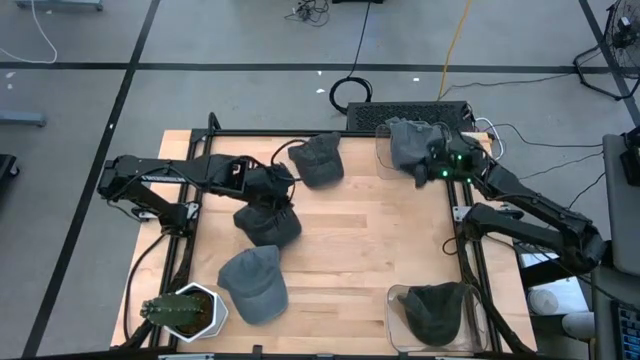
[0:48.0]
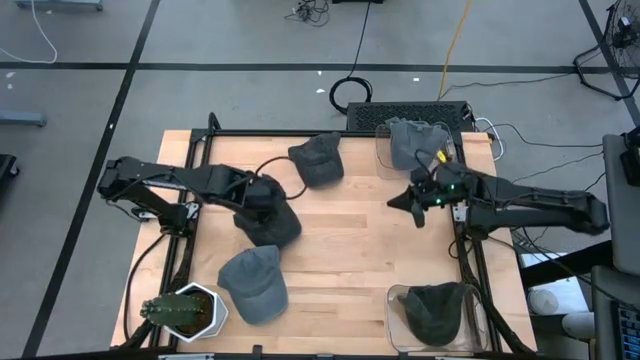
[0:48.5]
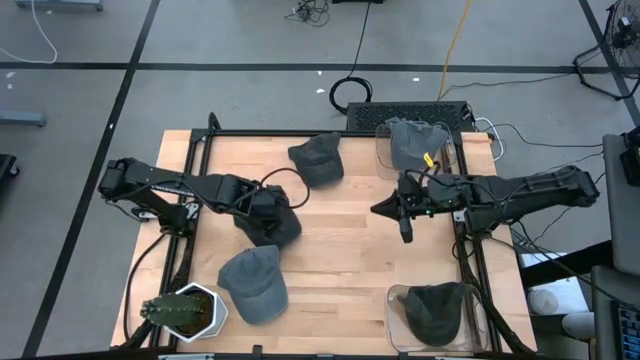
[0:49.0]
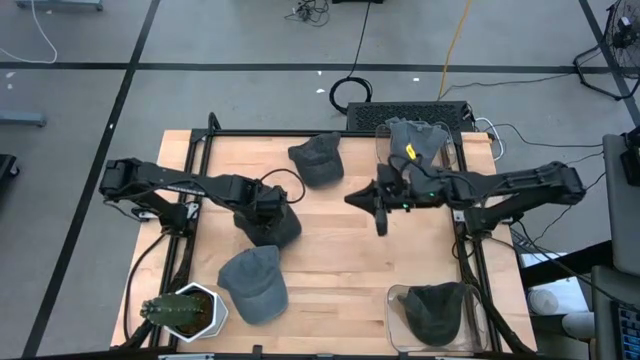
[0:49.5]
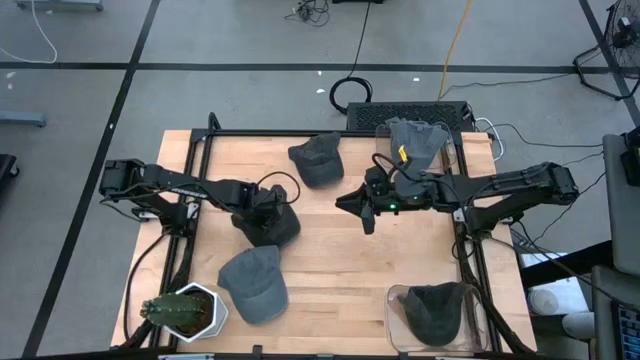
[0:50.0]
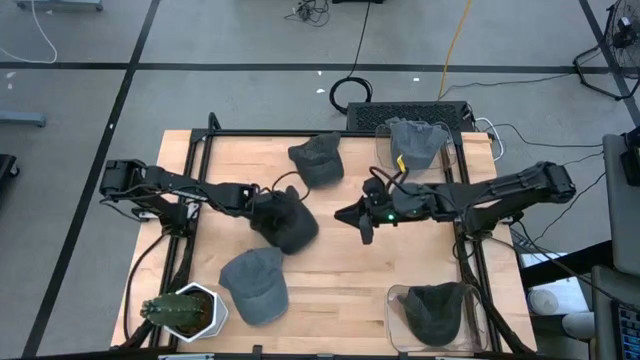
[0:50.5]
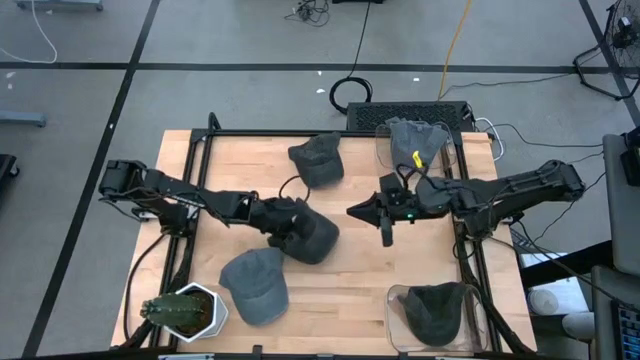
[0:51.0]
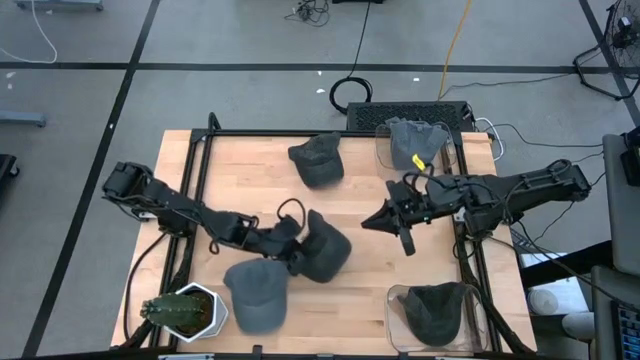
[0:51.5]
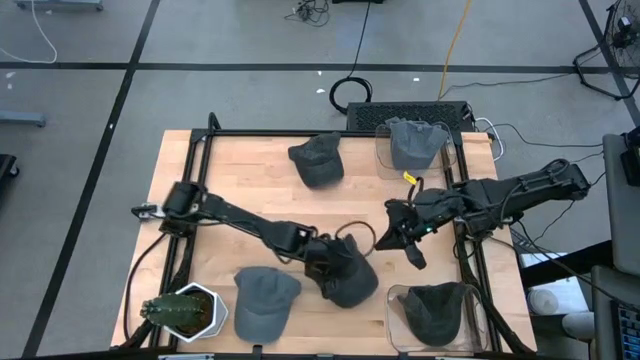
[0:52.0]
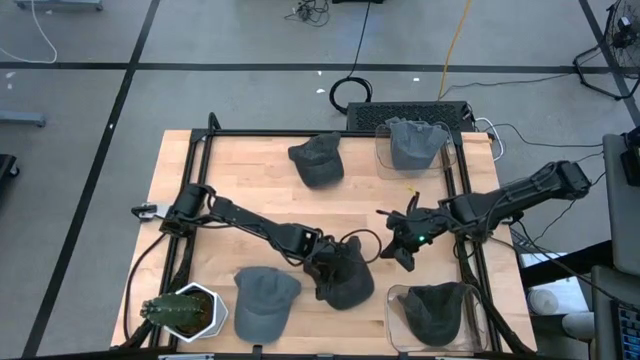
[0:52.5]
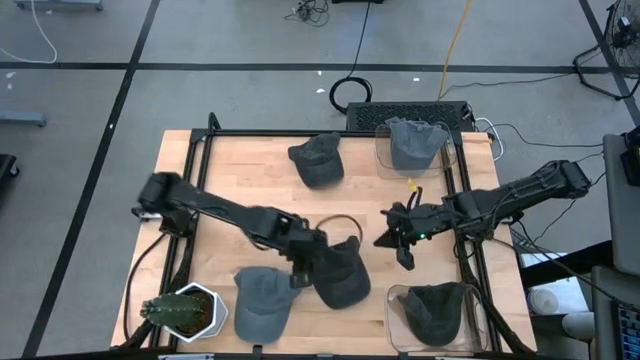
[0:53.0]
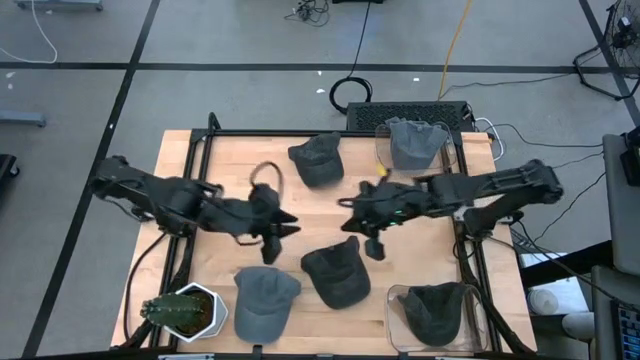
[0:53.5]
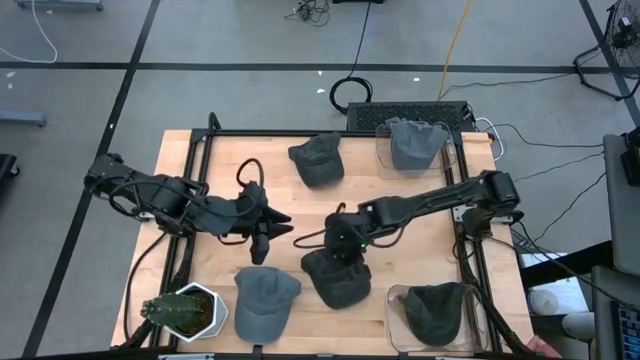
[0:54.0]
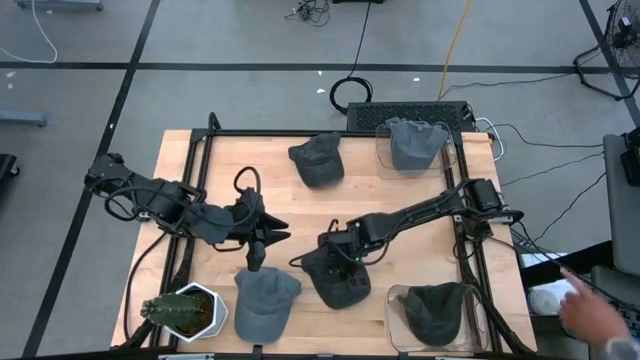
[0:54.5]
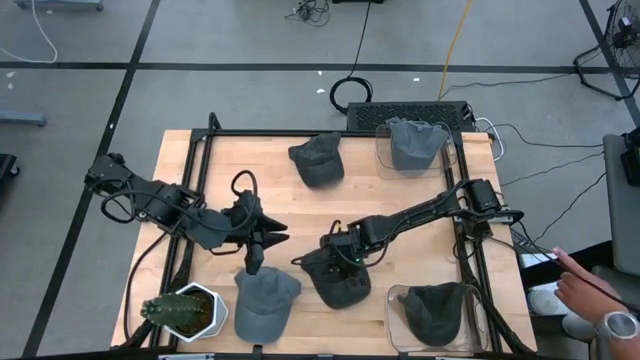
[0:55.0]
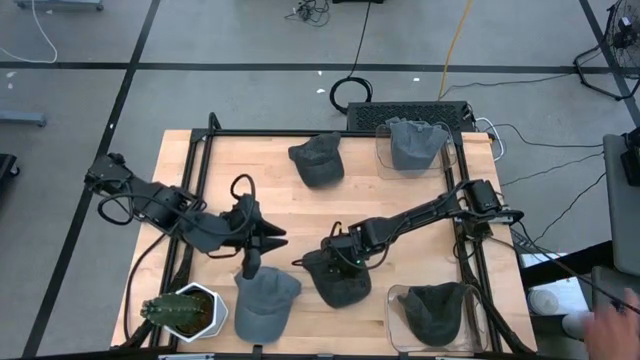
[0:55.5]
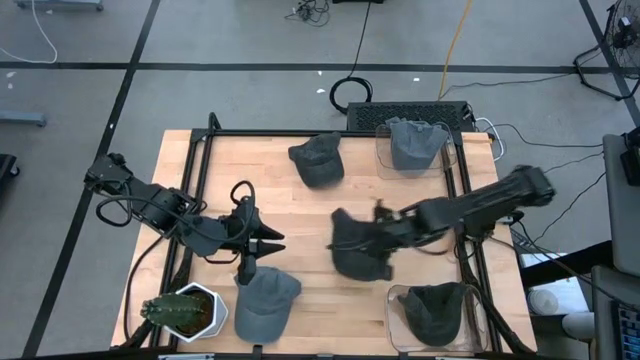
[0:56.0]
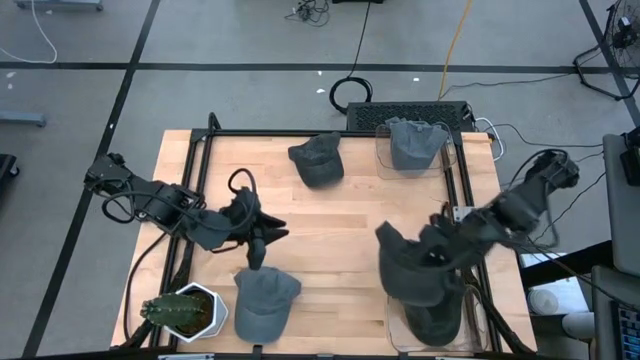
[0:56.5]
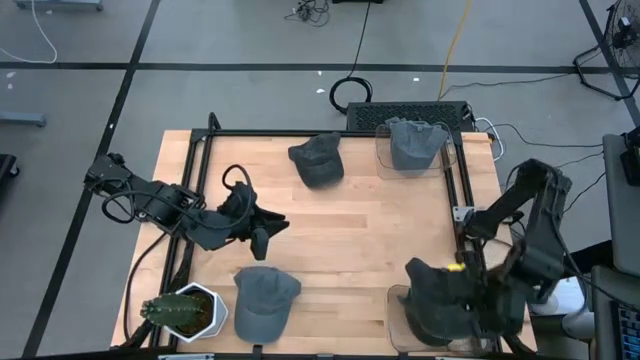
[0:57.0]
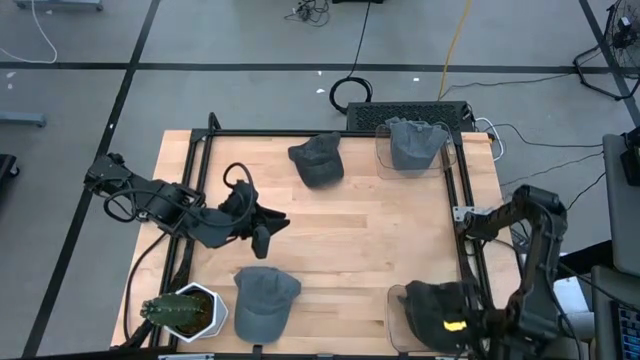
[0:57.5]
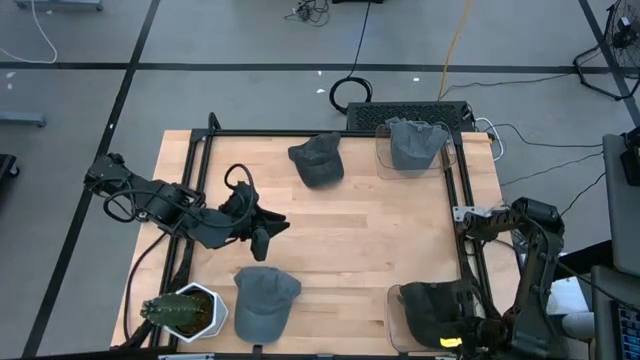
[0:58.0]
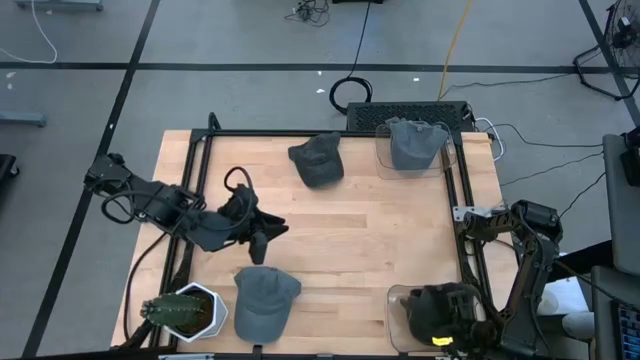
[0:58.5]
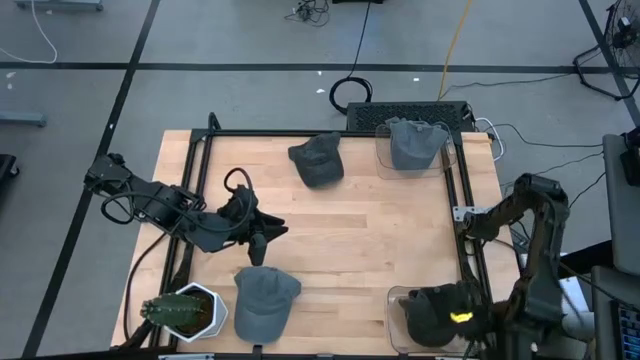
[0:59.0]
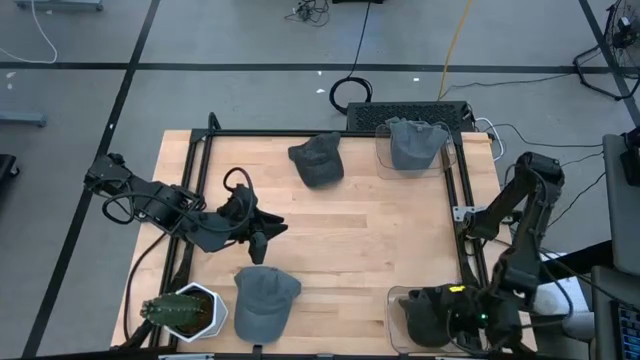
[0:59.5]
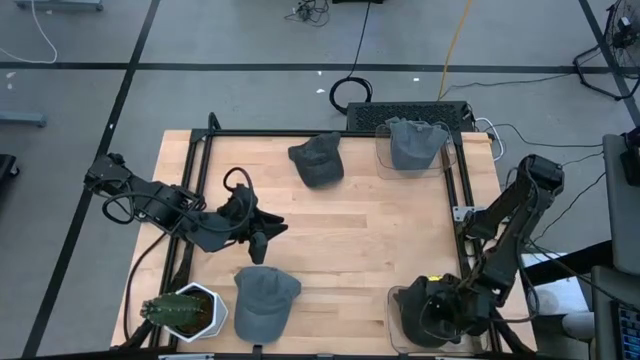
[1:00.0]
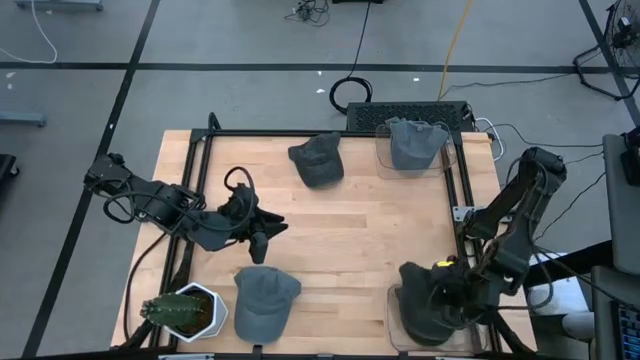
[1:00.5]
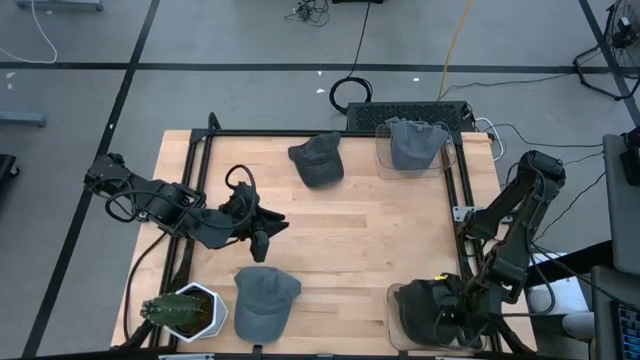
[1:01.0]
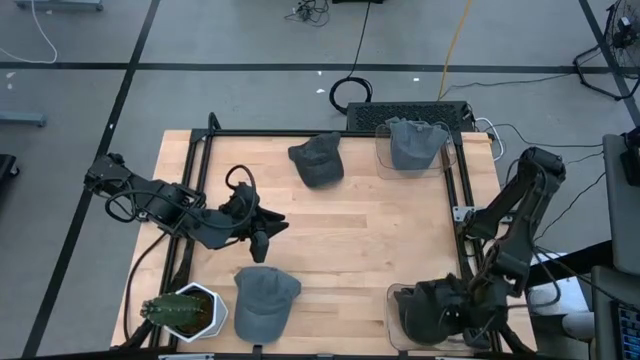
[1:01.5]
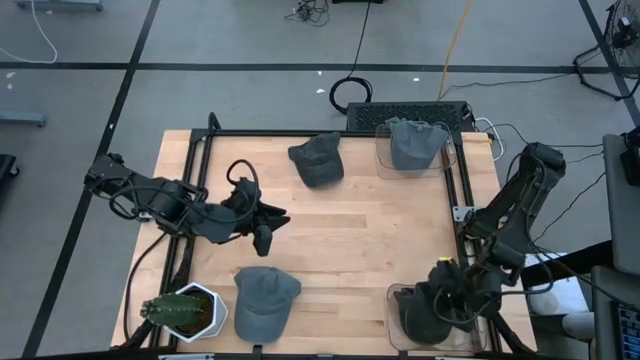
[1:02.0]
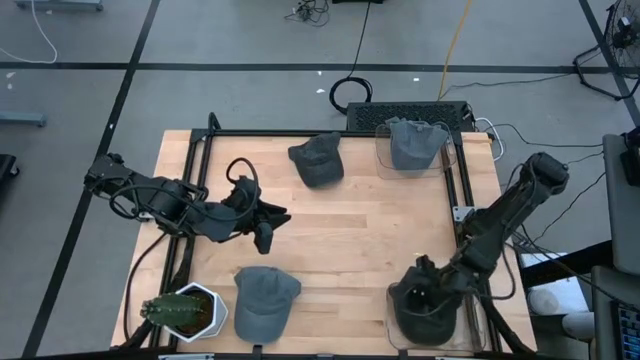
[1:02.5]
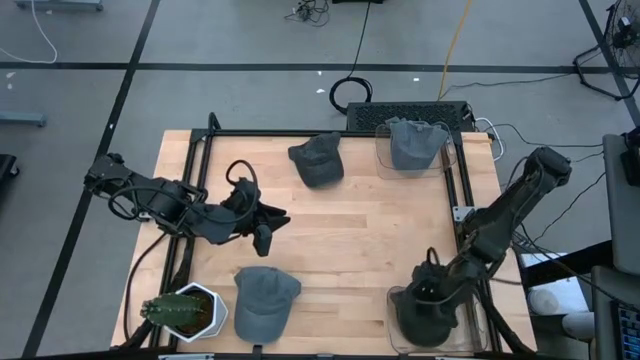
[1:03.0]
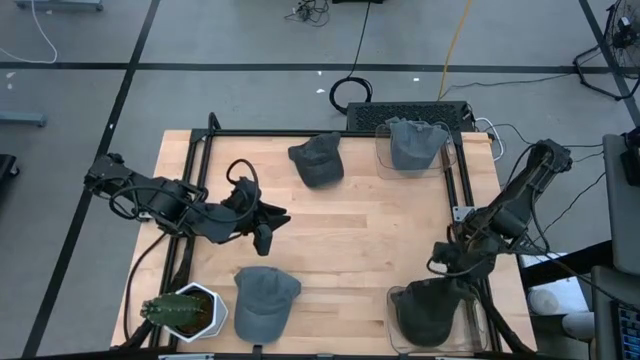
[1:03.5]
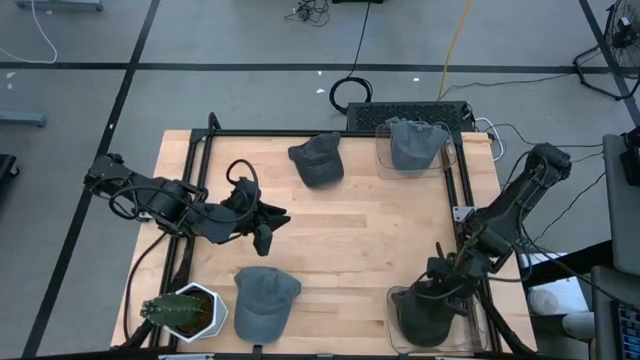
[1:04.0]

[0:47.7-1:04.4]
Task: Pick & Place hat
Put the bottom black cap into the bottom transparent bin

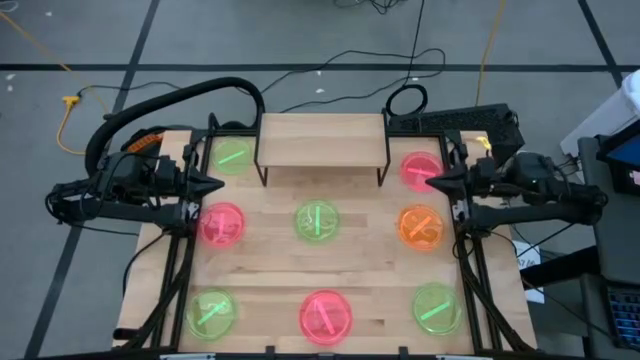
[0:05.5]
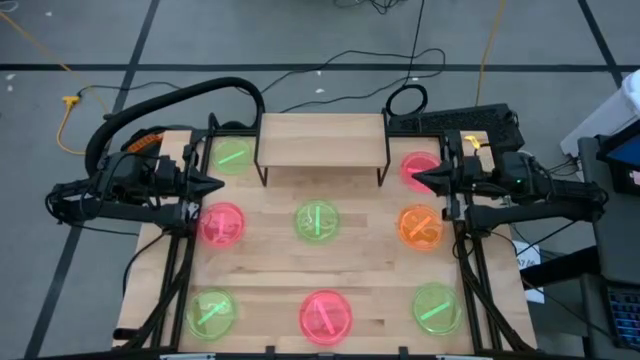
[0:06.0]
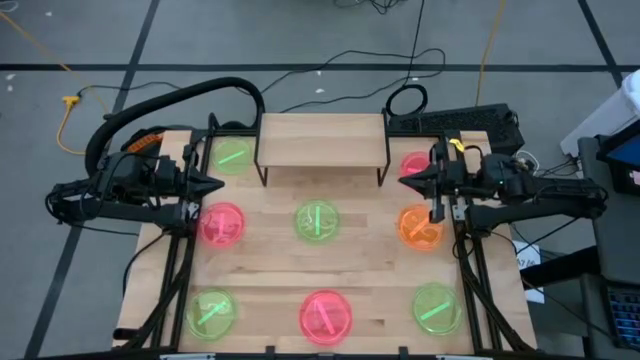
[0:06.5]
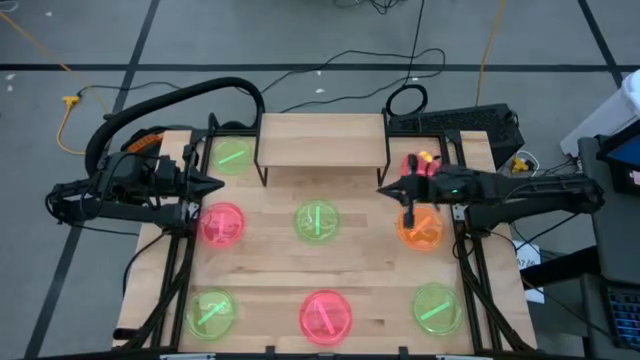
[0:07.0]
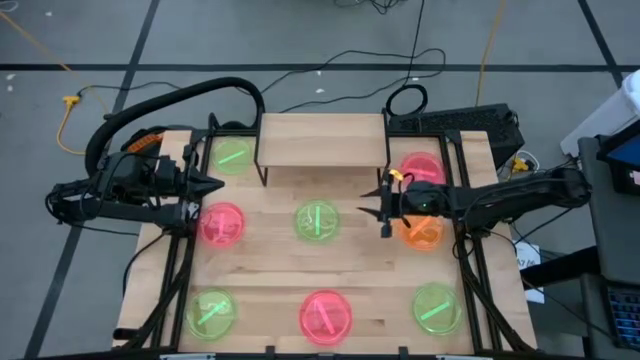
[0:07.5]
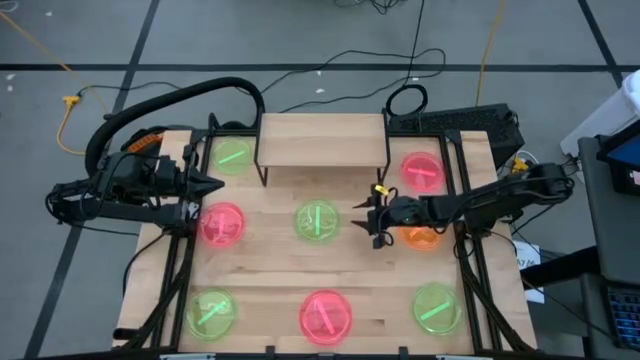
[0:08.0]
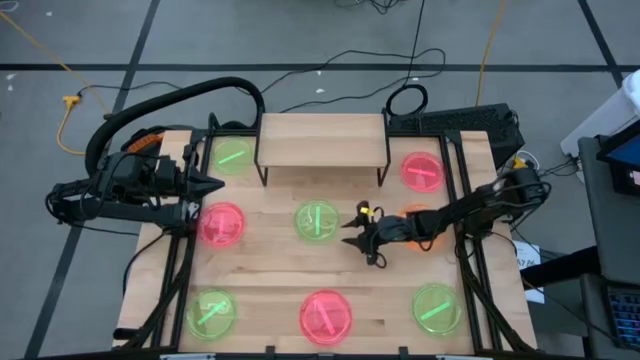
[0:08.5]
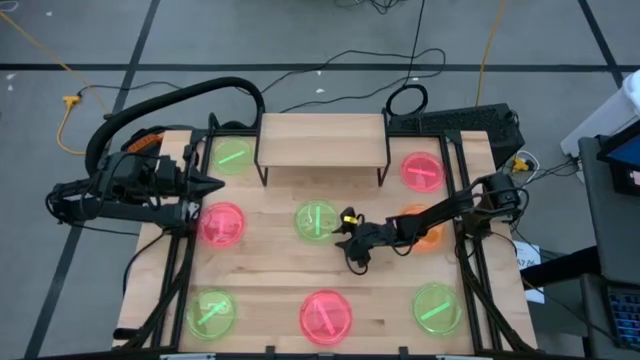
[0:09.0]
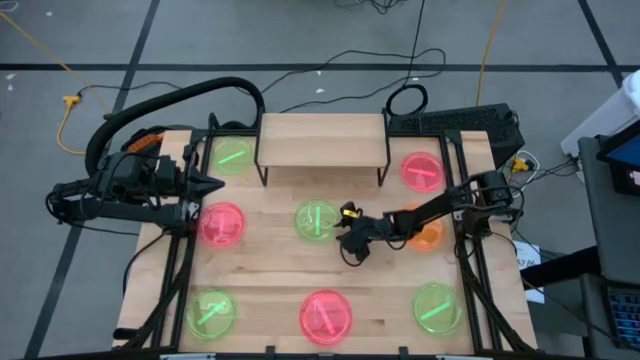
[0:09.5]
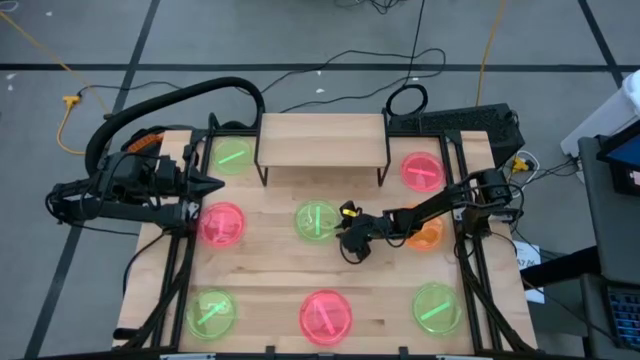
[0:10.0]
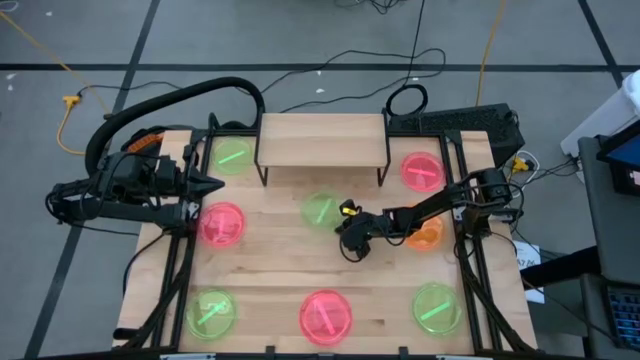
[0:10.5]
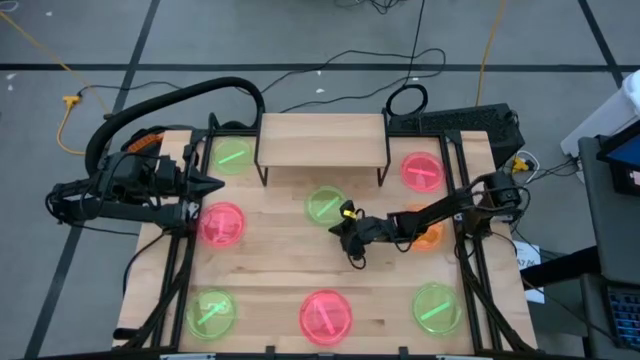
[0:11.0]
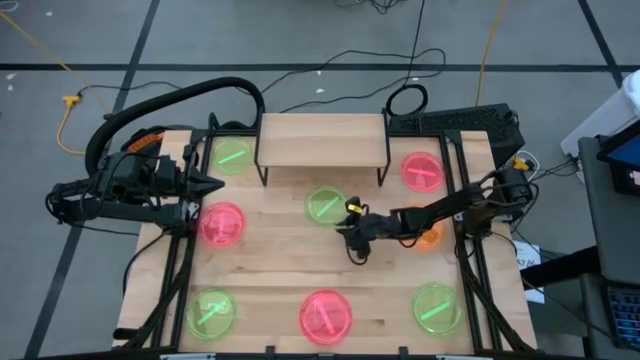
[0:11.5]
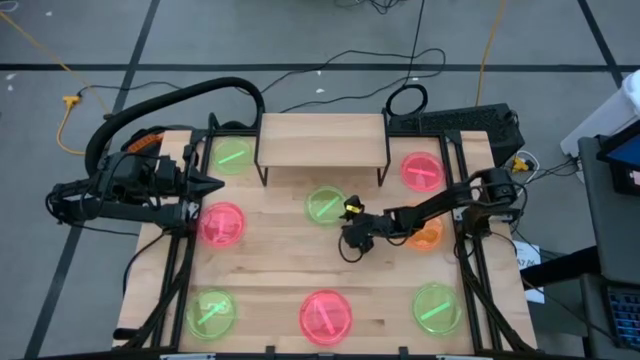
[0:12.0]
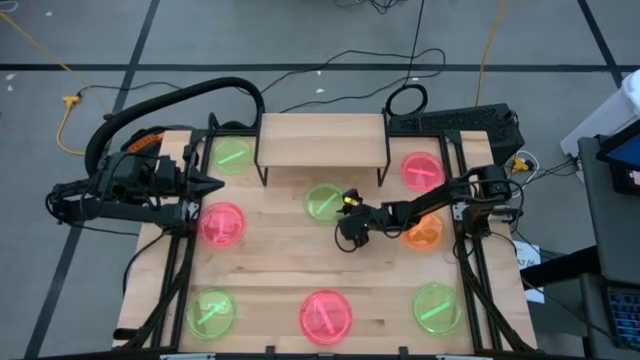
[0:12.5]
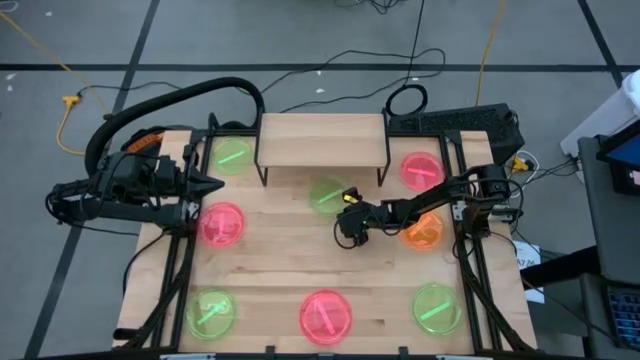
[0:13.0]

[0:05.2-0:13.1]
Task: Place and stack plates onto a shelf
Put the green plate on the shelf
